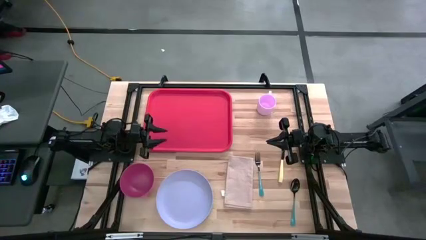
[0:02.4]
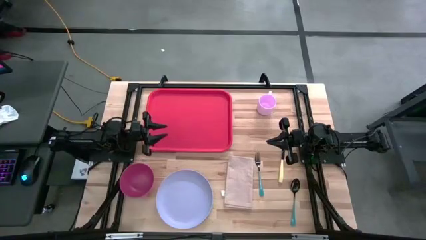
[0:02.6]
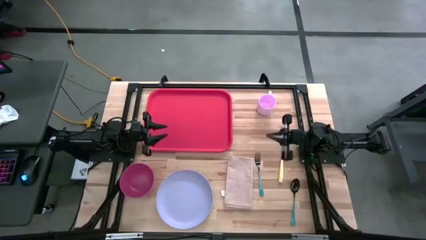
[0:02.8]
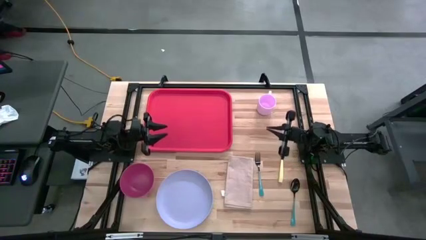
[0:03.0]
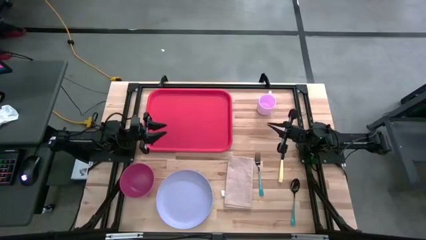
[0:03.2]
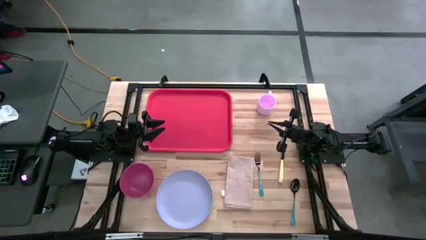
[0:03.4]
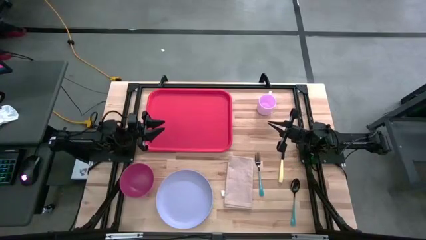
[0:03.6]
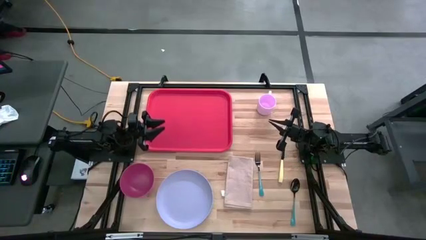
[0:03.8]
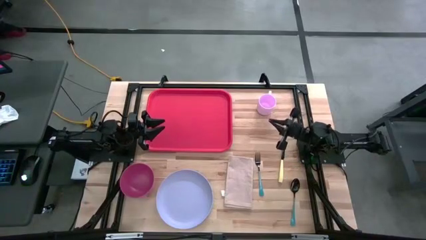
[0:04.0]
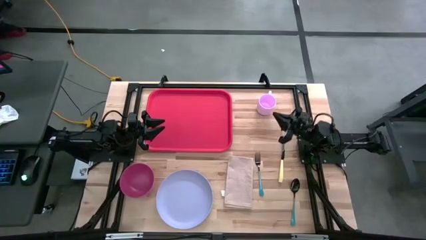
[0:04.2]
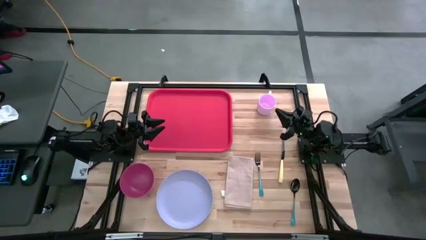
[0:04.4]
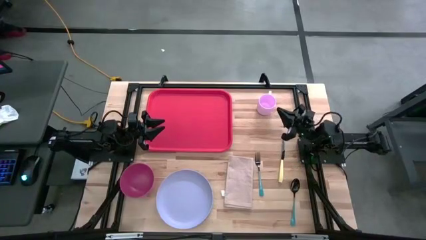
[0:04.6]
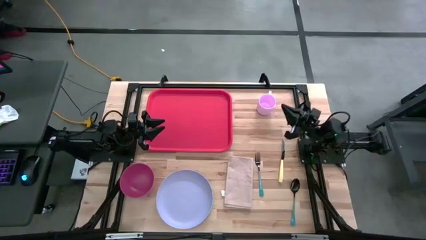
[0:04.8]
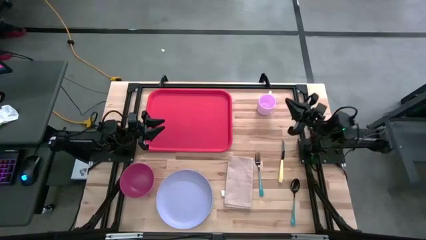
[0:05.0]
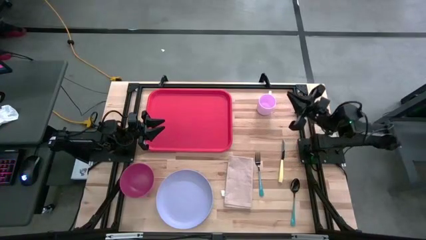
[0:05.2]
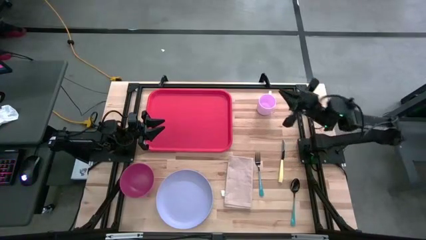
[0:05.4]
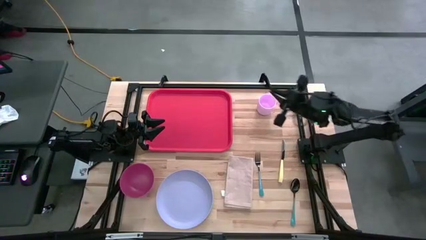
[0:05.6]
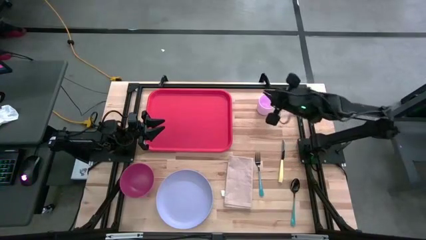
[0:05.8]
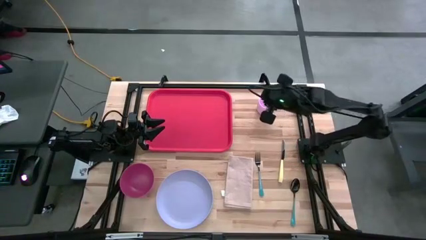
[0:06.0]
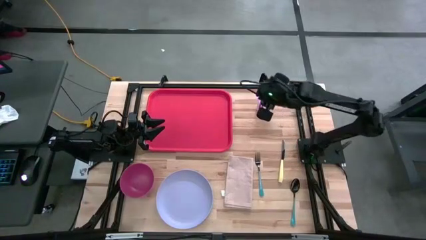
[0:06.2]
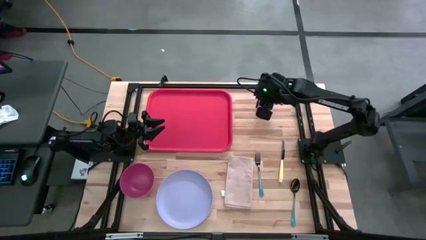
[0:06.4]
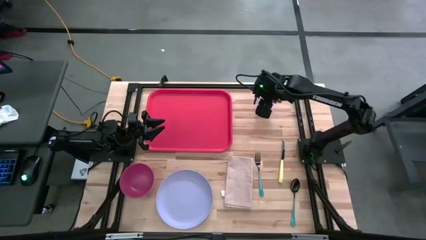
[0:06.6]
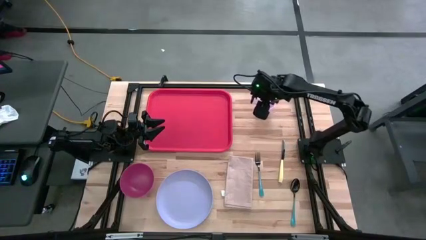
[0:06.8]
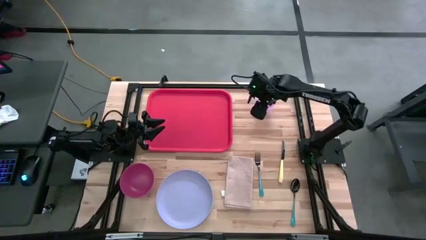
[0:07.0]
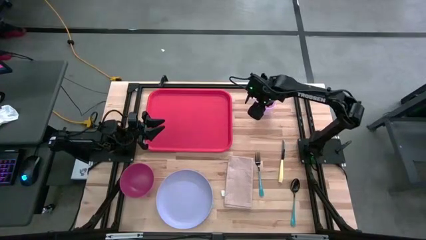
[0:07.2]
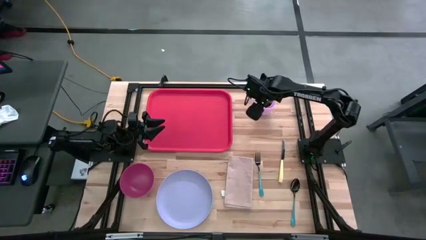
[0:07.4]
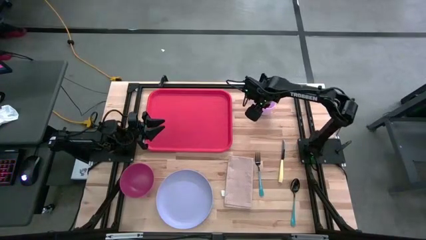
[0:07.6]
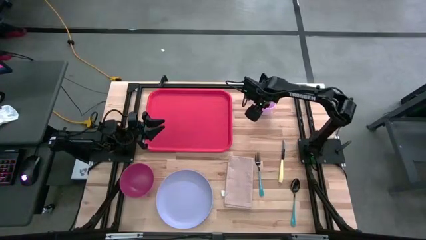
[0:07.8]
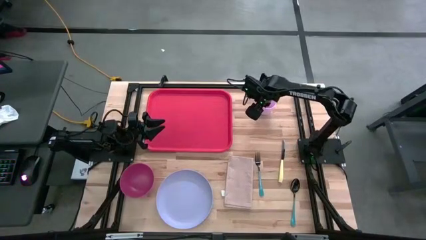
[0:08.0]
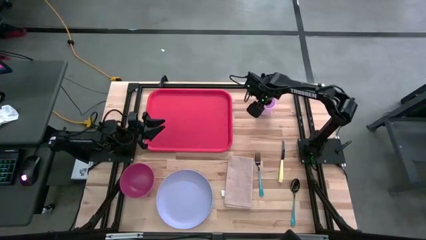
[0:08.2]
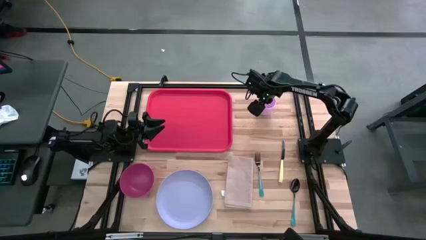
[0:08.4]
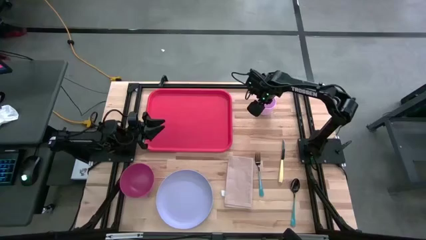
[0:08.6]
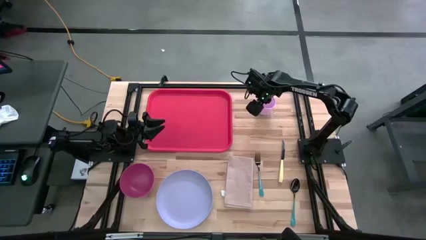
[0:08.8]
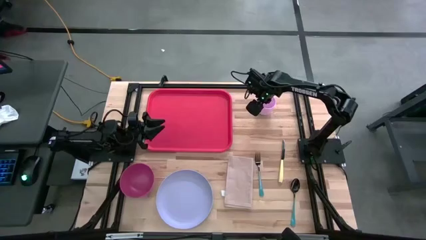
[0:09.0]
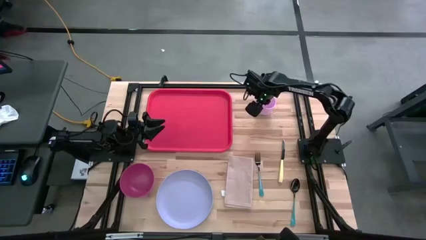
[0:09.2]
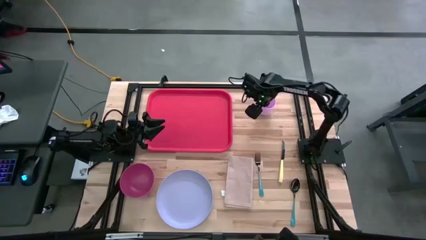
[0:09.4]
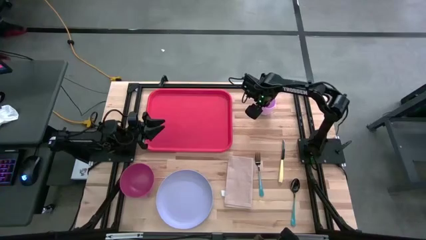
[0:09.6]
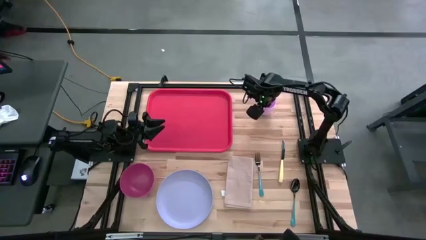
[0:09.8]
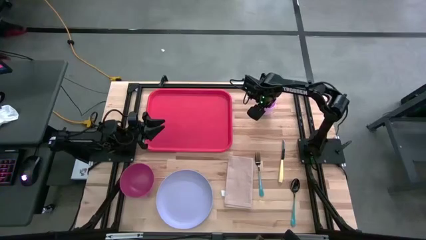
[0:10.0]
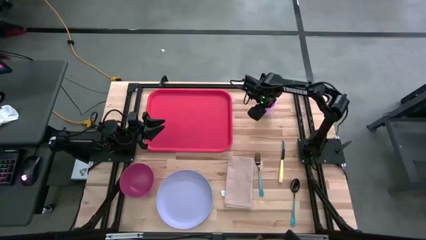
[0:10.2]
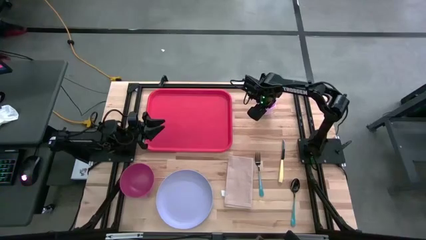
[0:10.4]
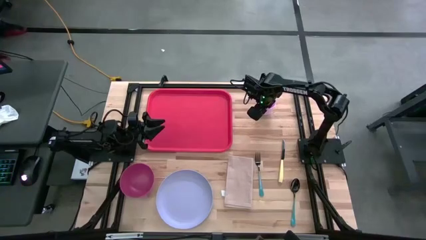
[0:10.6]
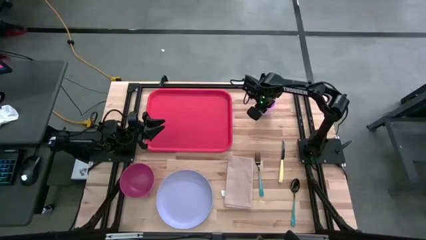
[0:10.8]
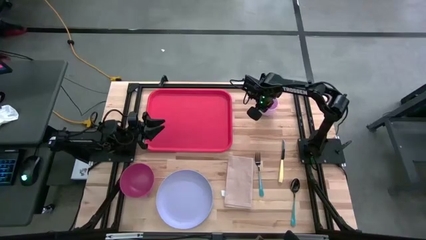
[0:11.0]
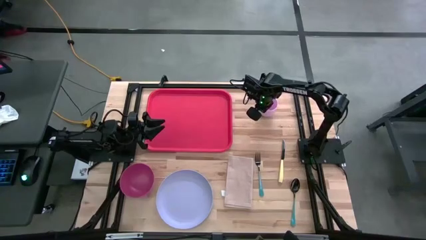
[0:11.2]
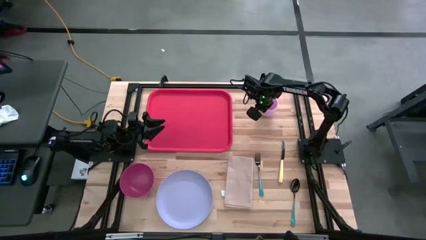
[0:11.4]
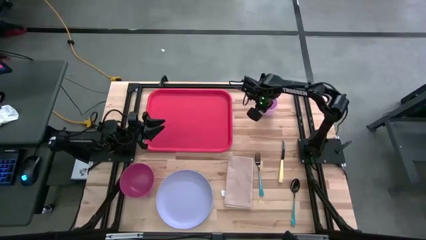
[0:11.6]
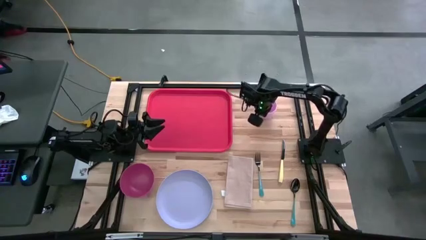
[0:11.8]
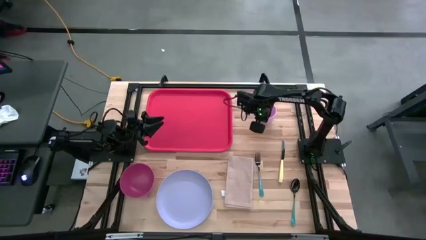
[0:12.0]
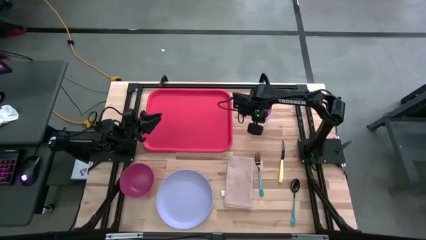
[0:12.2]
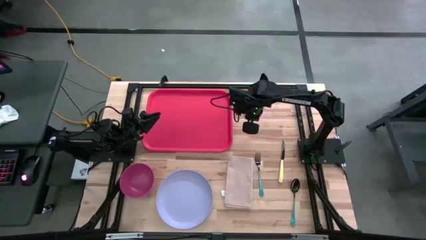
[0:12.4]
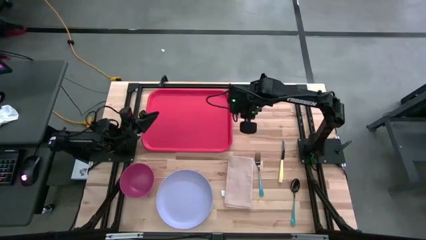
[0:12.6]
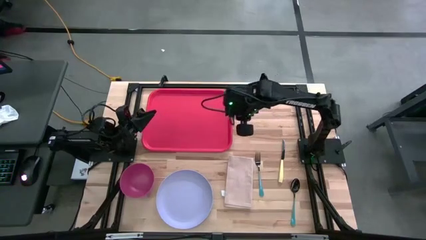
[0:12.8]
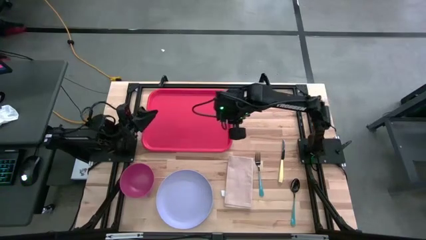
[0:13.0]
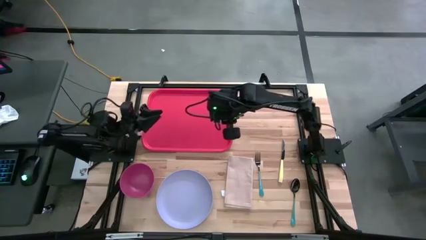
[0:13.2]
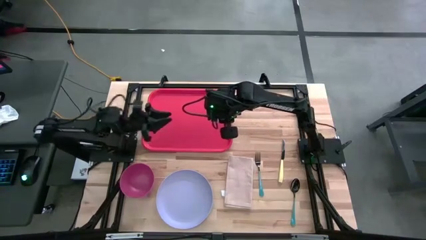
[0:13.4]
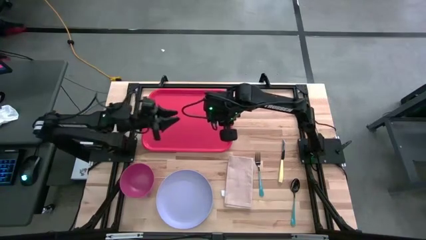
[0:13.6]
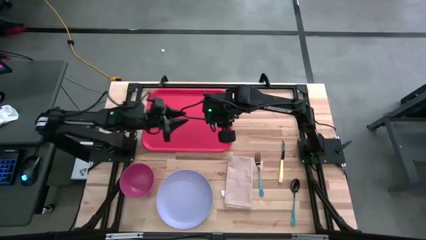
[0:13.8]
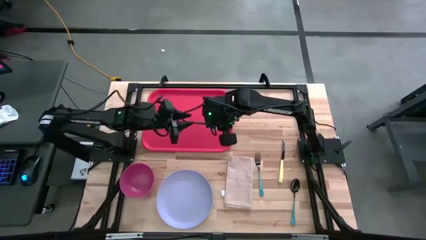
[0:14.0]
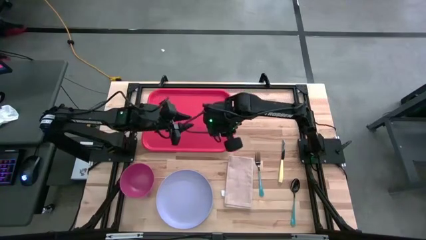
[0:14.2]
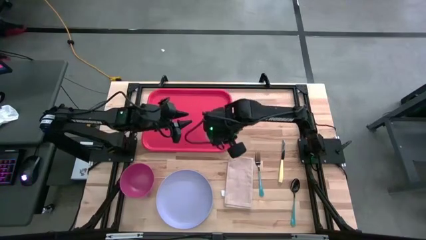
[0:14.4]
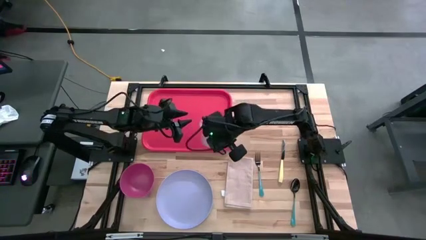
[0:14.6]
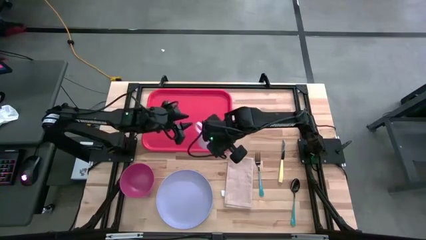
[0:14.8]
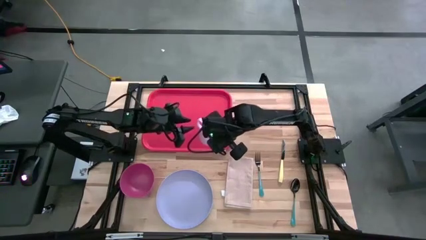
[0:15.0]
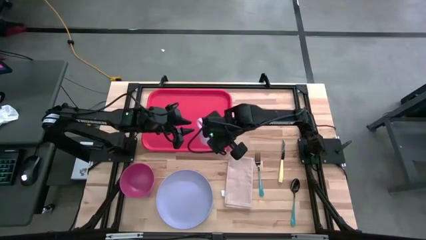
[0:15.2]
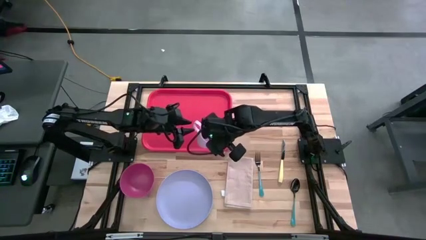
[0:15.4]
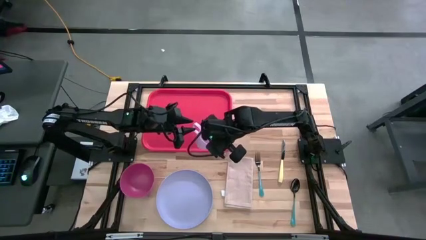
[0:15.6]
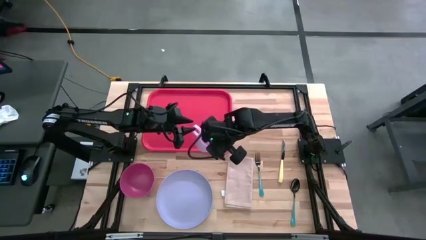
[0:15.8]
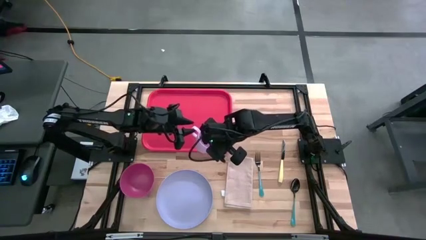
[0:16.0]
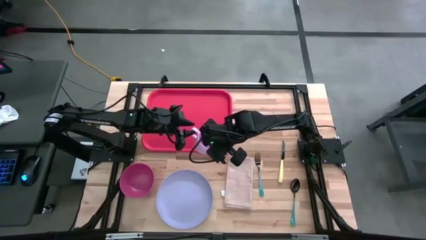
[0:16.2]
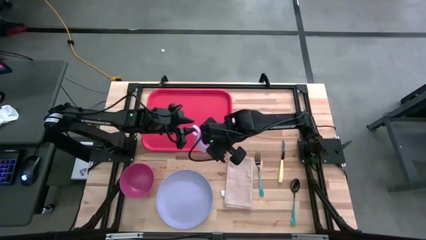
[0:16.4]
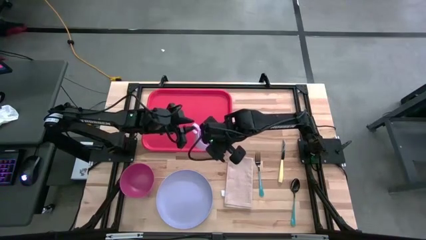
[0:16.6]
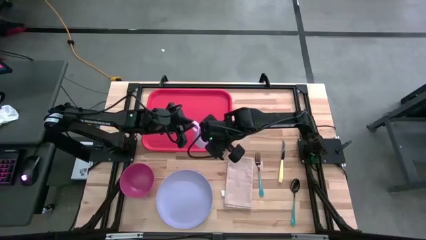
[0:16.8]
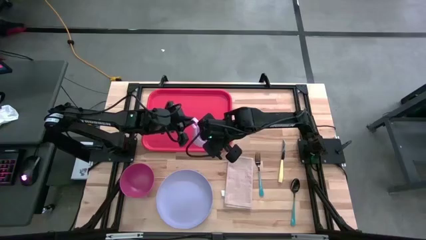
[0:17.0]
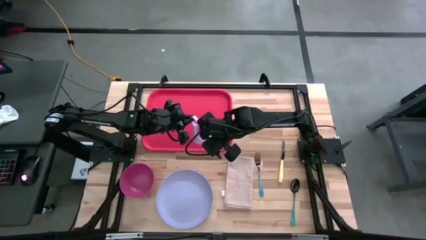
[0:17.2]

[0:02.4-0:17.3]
Task: Set up tray
Put the pink mug on the red tray
